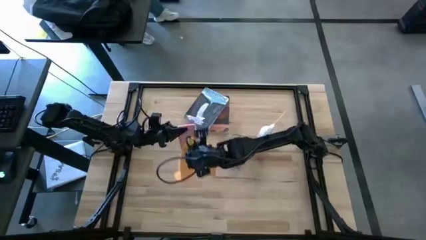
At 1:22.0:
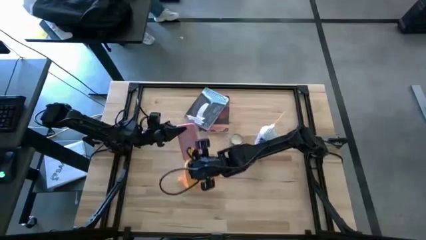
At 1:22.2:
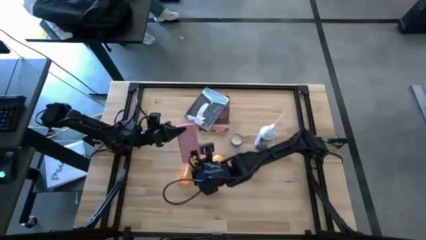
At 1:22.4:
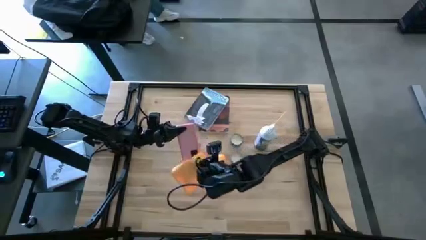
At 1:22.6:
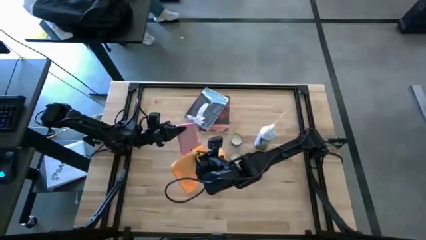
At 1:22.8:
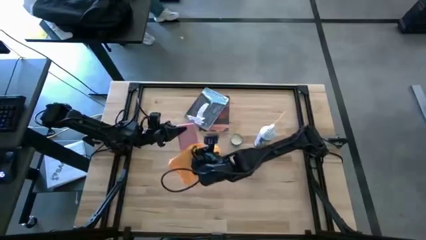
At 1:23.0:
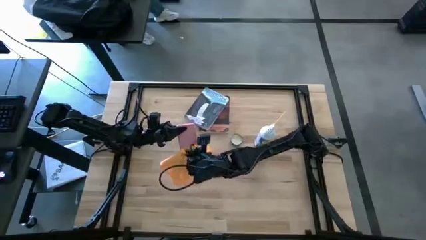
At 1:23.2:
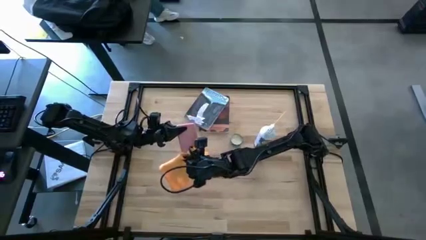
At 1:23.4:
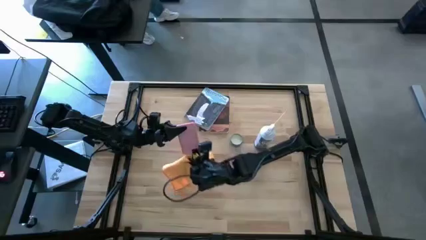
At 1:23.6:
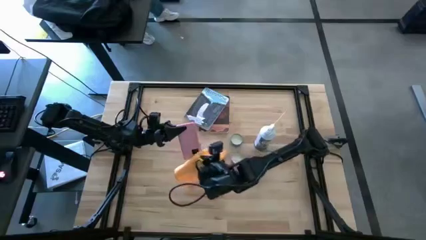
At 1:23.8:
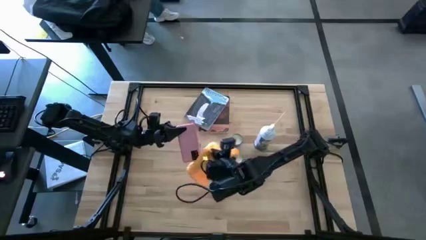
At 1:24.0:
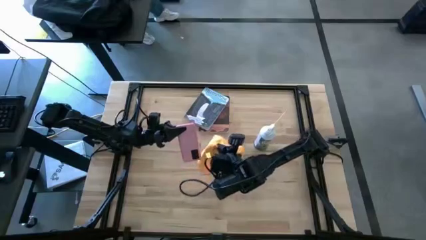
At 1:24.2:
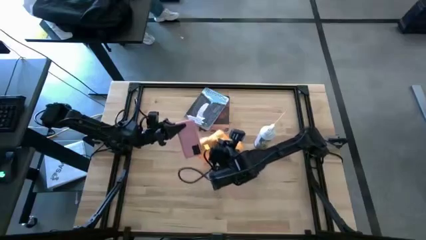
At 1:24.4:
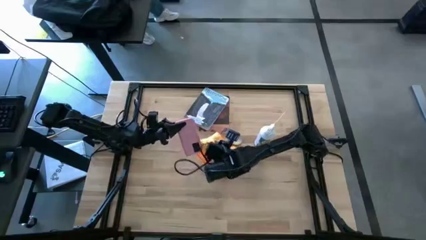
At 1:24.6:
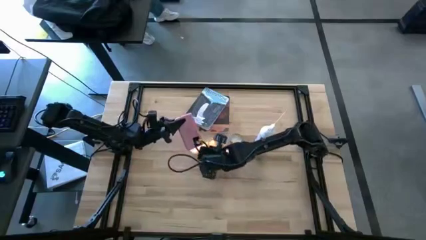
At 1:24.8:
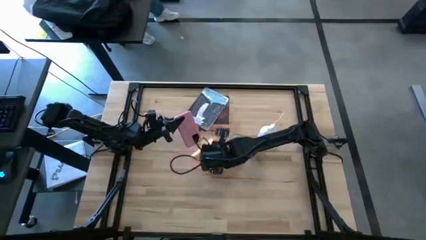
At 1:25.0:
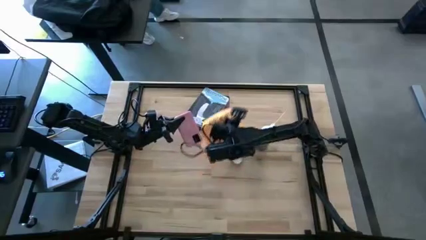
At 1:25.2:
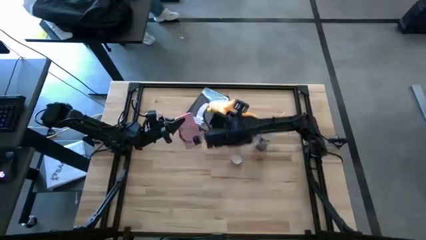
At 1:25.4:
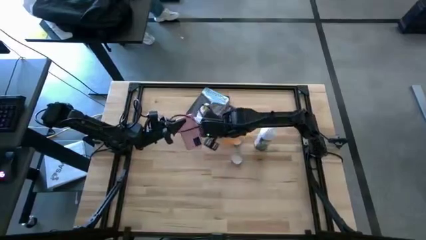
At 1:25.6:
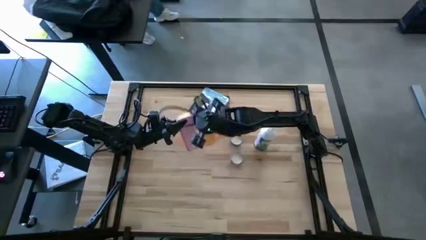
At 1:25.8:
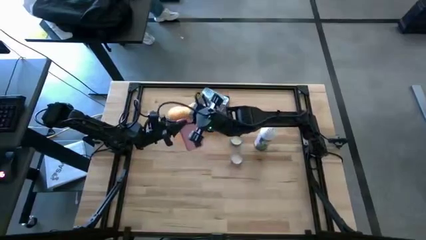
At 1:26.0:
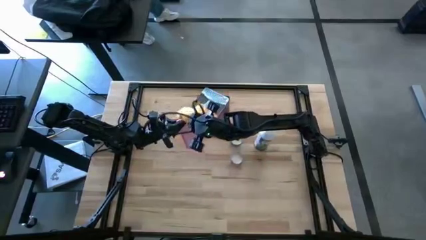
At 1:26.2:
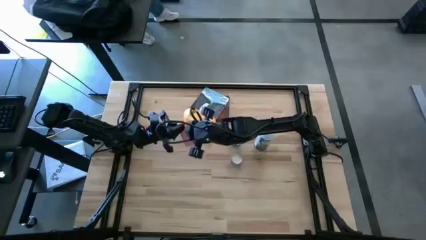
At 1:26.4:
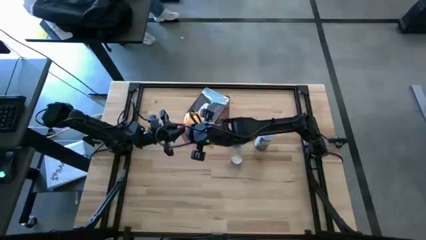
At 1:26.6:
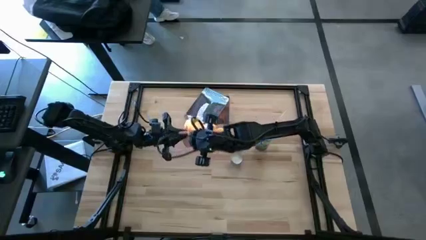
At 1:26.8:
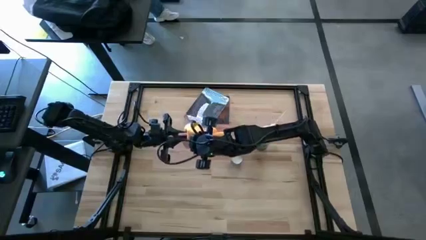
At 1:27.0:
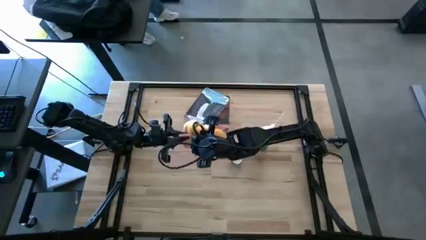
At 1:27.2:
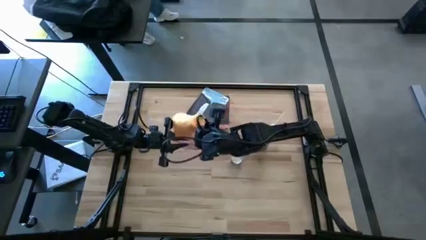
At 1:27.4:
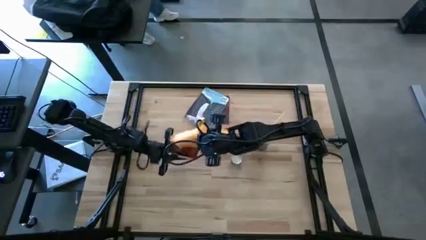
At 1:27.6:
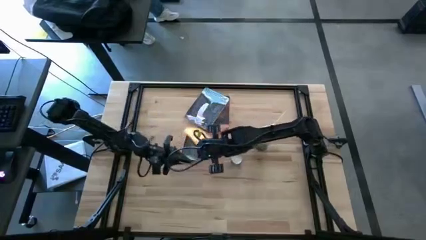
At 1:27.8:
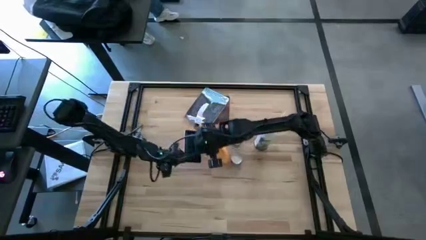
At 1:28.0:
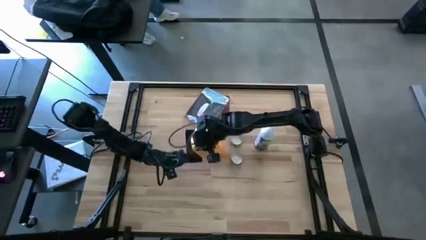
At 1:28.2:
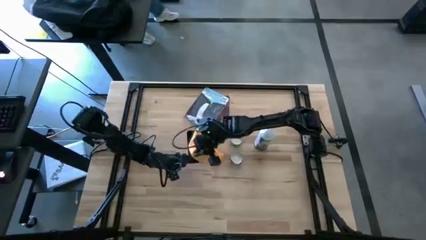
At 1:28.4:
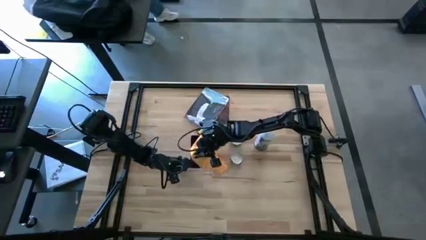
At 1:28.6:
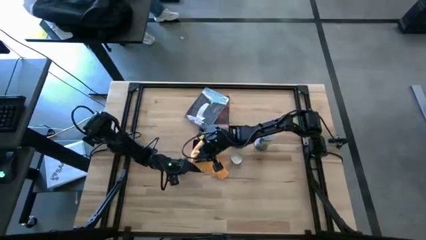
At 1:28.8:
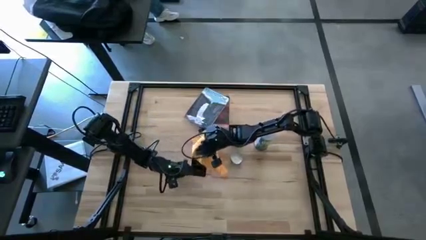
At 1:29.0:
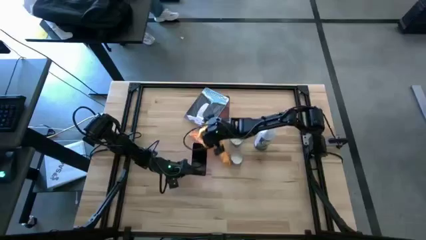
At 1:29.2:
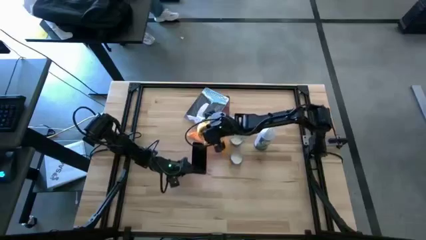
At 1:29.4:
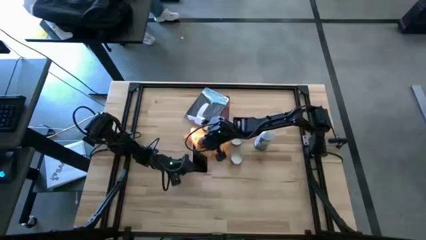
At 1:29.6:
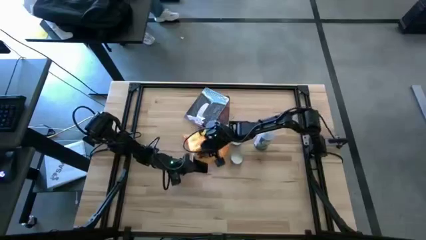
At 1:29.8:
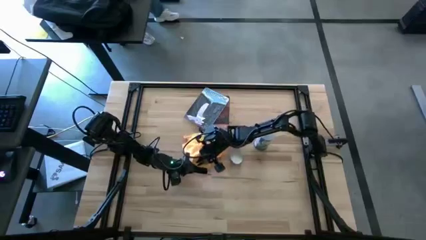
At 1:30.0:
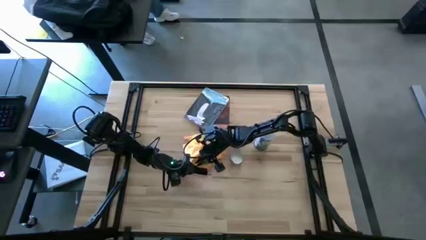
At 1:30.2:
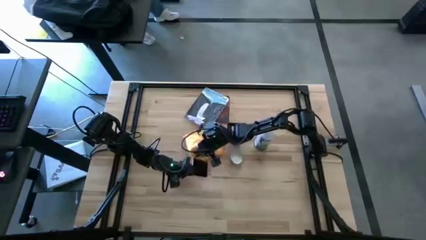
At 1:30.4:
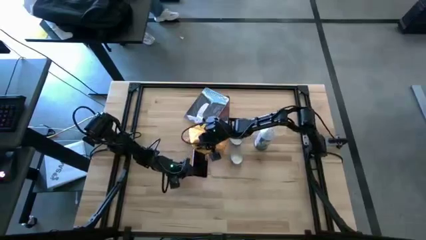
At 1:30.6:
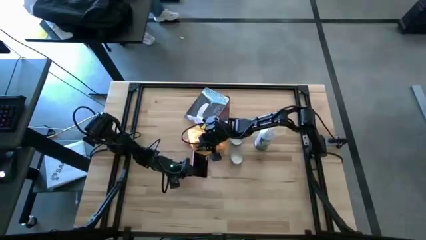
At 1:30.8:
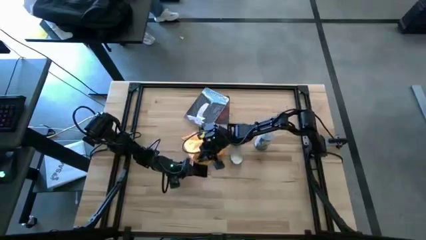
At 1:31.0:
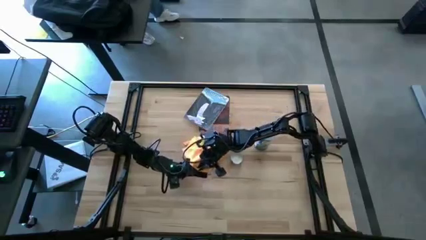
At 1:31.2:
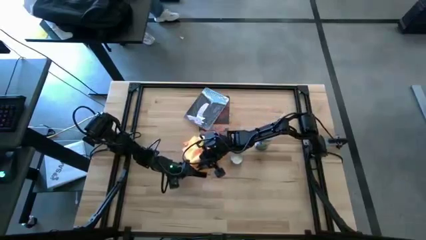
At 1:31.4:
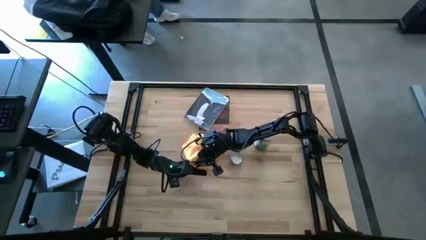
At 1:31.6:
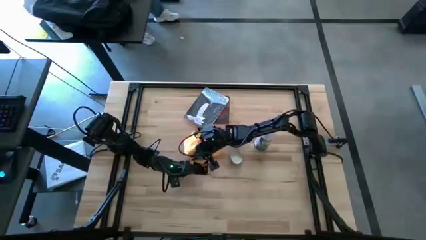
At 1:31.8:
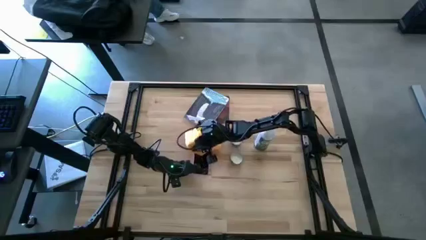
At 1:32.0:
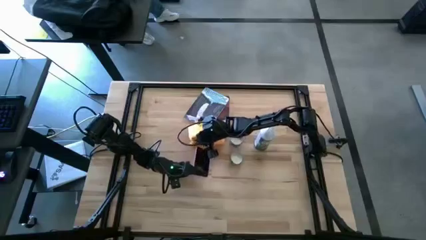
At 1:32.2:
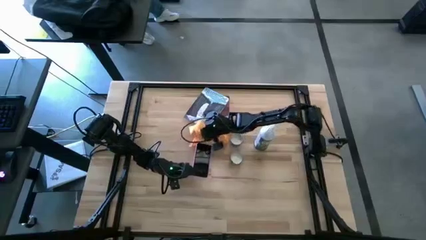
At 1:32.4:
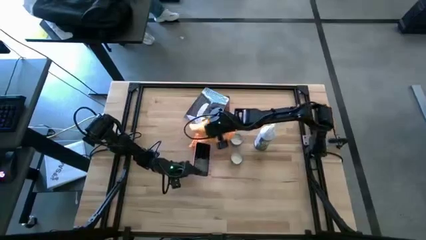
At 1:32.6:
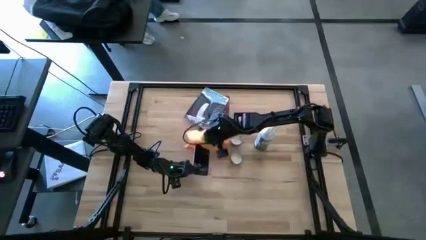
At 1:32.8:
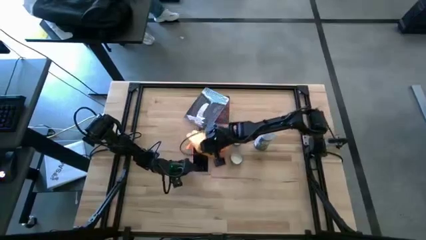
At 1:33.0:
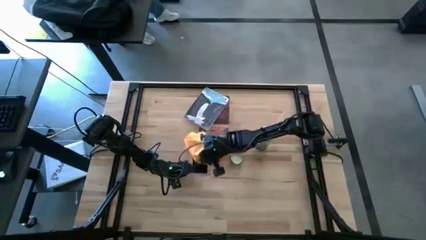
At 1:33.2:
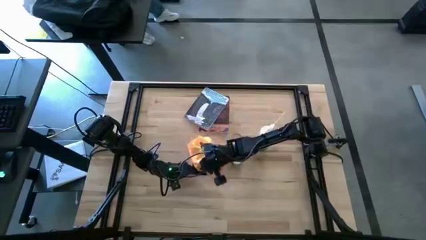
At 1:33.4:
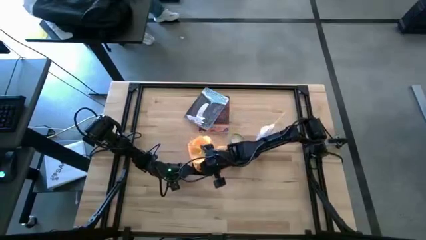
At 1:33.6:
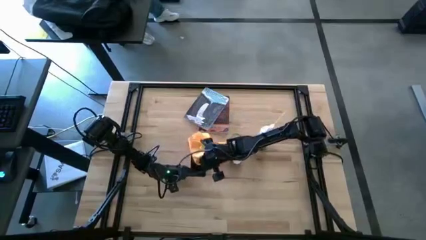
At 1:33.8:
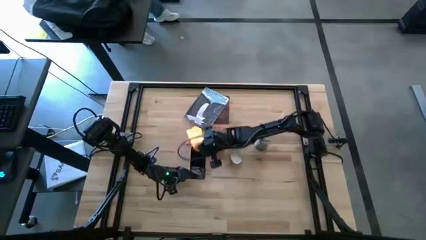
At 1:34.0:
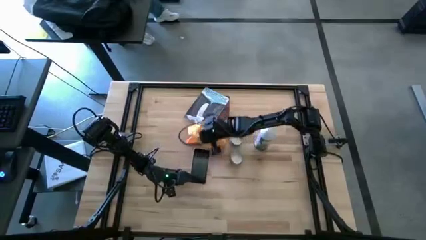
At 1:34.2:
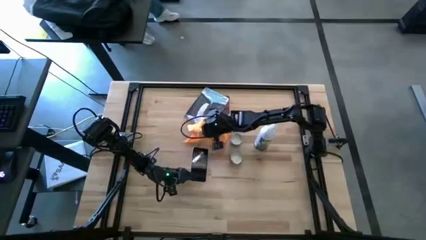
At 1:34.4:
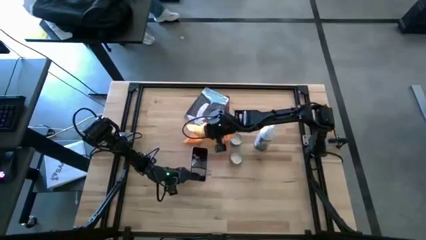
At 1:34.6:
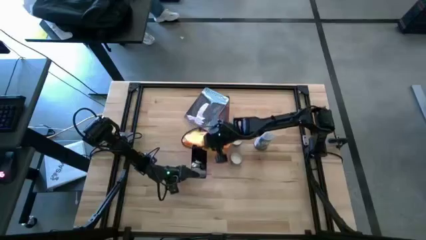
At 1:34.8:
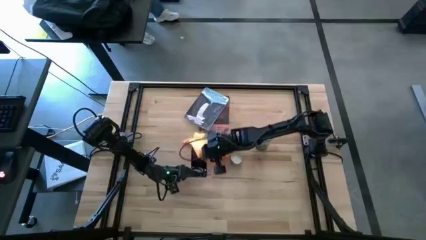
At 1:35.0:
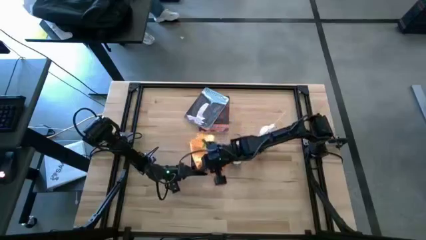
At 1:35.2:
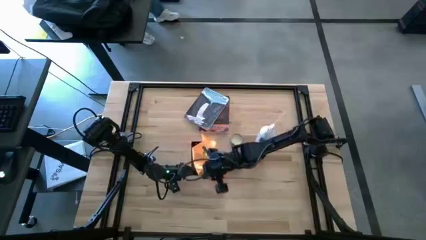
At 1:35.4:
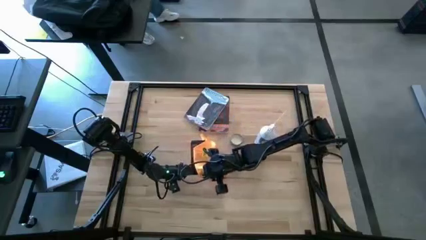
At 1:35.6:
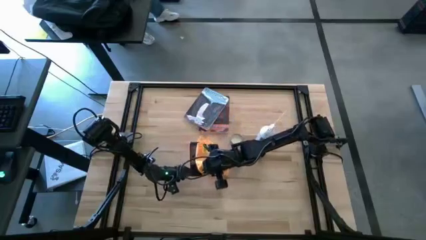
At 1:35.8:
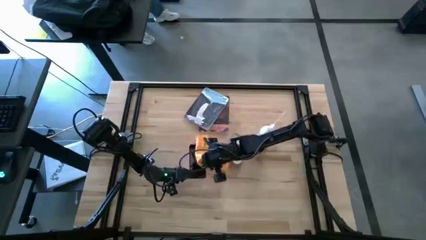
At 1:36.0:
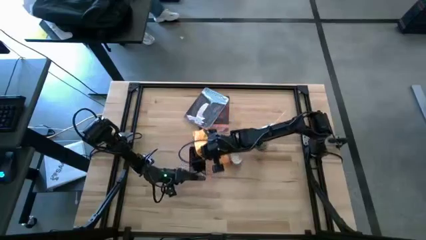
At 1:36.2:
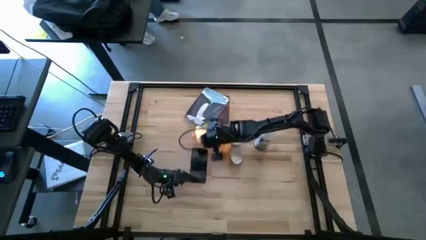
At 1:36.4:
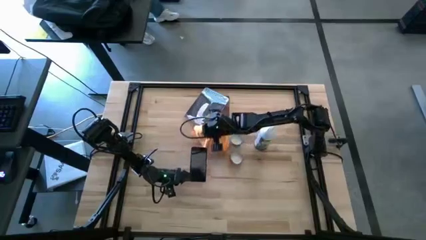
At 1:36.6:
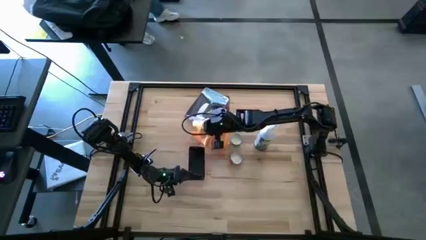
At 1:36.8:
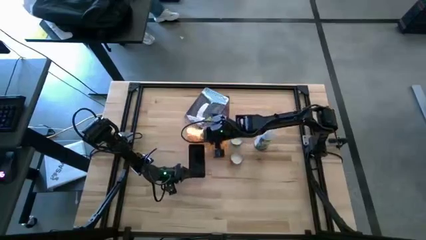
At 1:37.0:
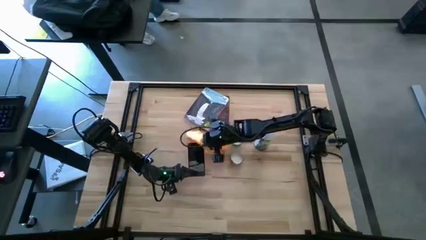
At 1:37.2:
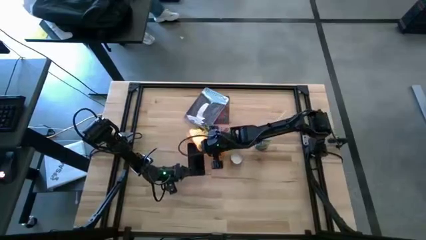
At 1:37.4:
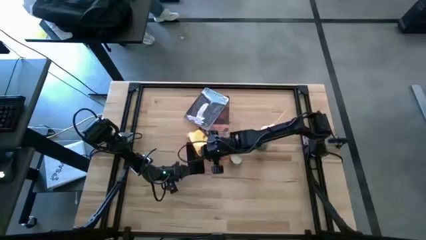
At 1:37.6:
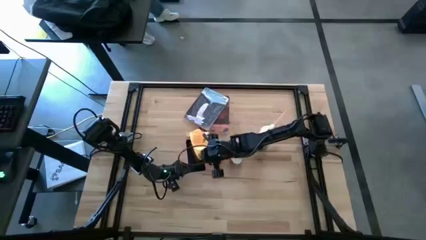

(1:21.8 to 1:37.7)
Task: Apply microfiber cloth
Wipe the pink phone with the orange microfiber cloth
